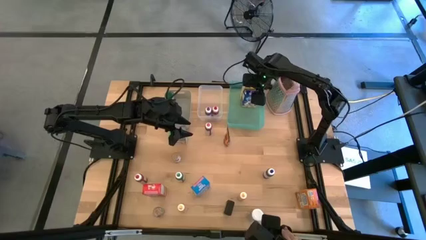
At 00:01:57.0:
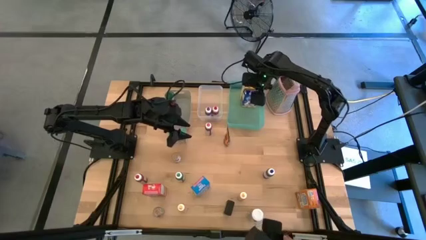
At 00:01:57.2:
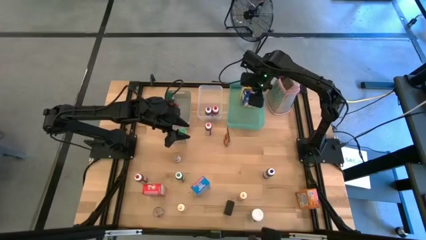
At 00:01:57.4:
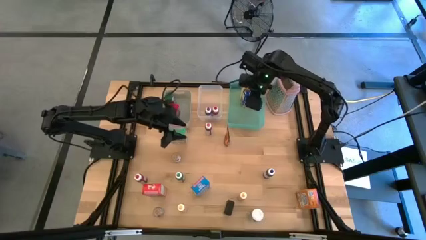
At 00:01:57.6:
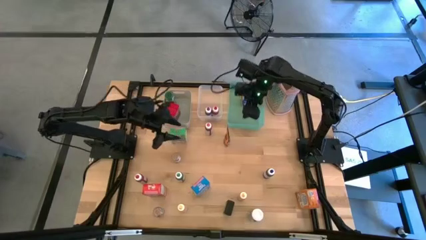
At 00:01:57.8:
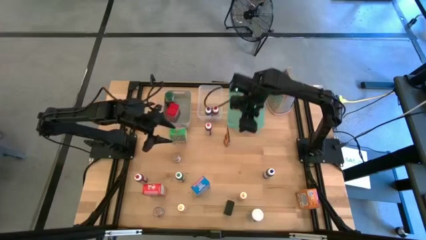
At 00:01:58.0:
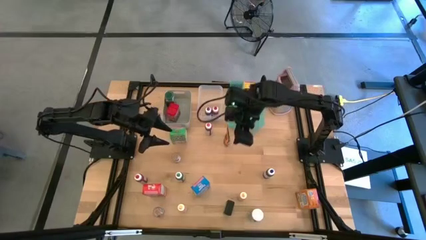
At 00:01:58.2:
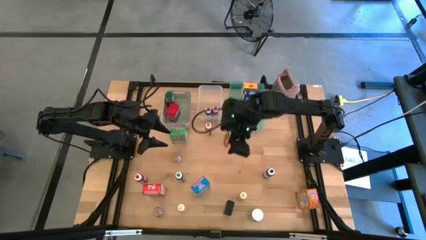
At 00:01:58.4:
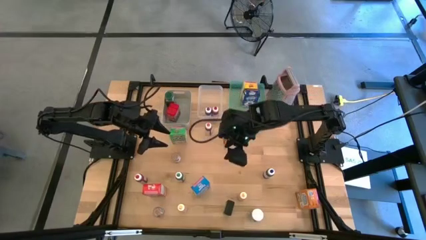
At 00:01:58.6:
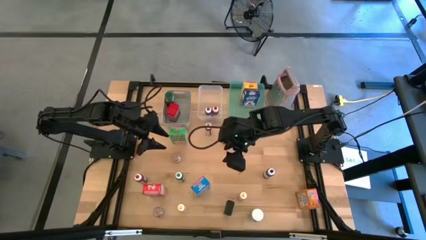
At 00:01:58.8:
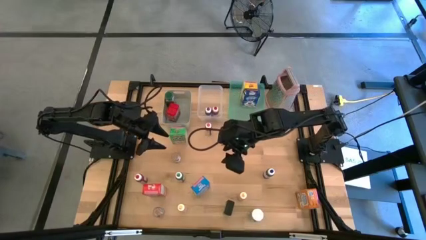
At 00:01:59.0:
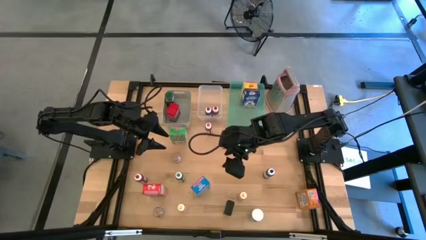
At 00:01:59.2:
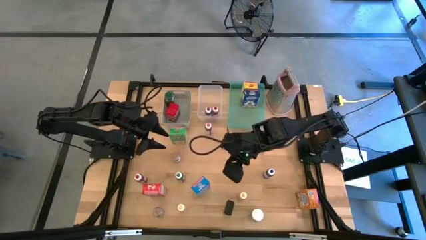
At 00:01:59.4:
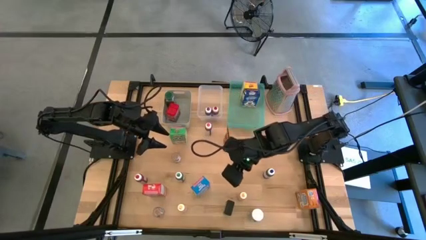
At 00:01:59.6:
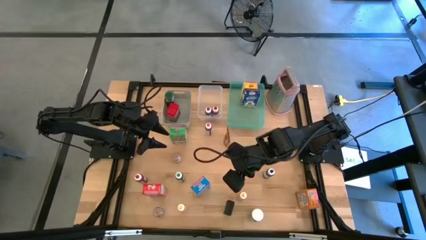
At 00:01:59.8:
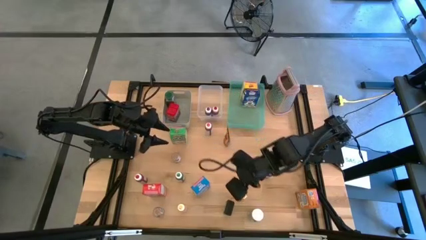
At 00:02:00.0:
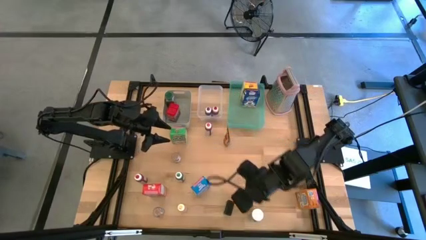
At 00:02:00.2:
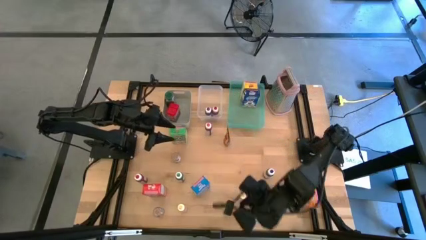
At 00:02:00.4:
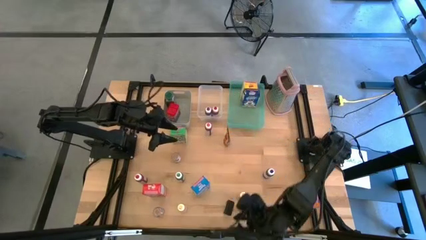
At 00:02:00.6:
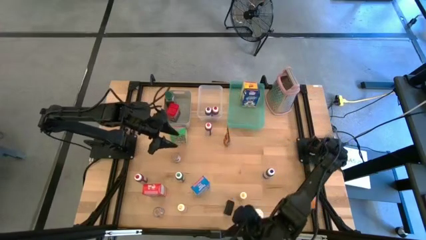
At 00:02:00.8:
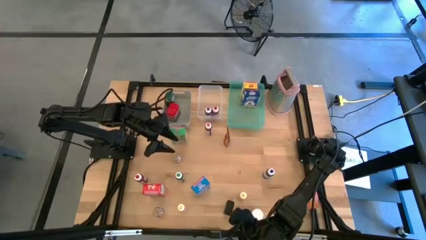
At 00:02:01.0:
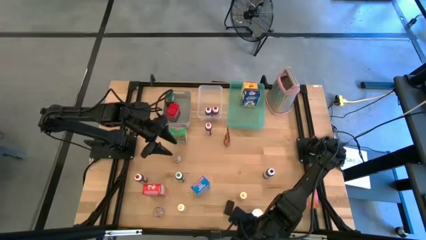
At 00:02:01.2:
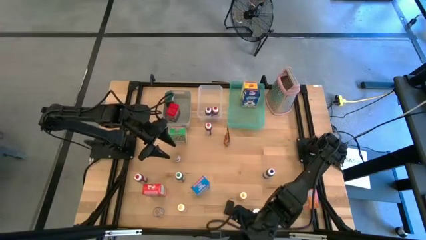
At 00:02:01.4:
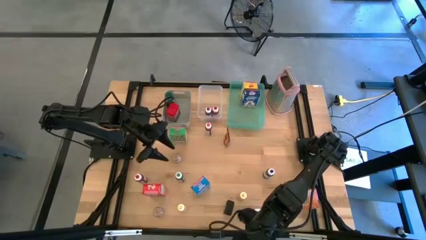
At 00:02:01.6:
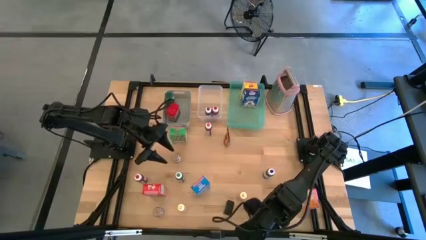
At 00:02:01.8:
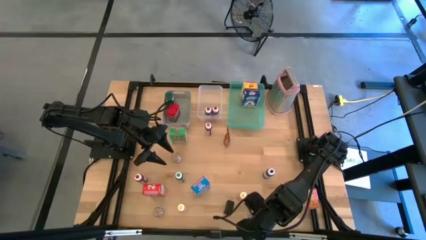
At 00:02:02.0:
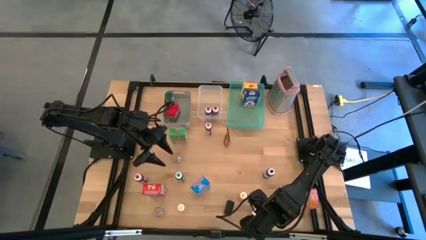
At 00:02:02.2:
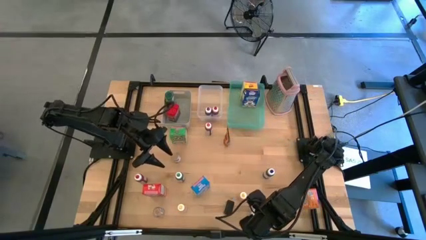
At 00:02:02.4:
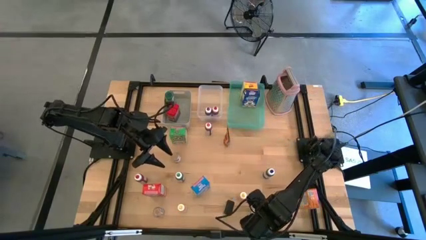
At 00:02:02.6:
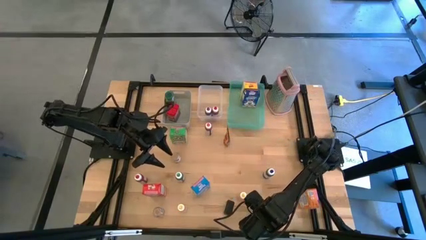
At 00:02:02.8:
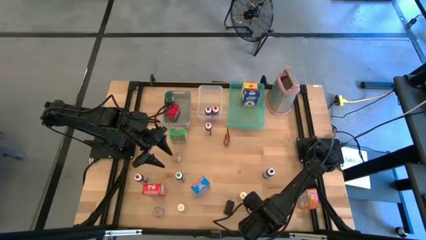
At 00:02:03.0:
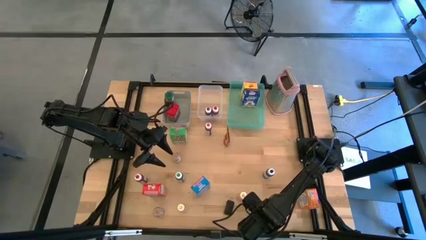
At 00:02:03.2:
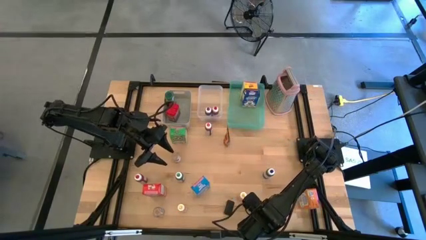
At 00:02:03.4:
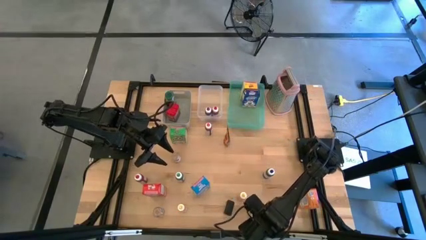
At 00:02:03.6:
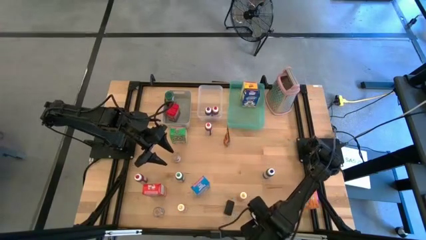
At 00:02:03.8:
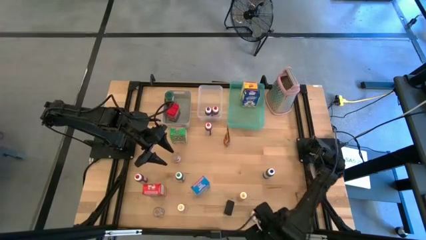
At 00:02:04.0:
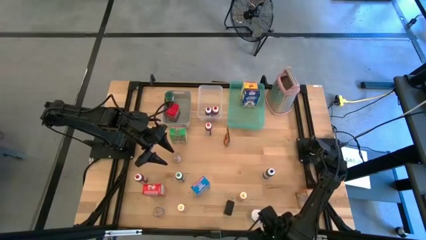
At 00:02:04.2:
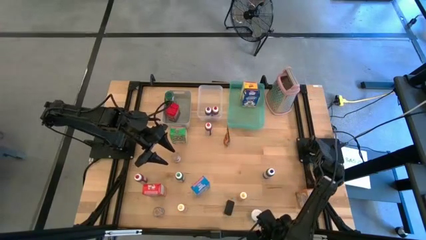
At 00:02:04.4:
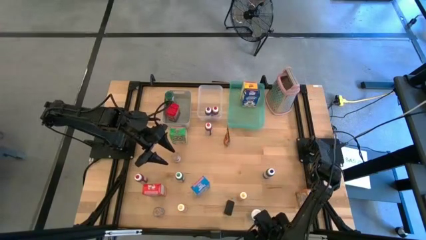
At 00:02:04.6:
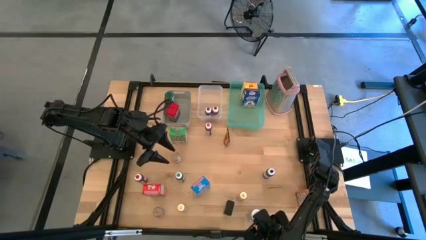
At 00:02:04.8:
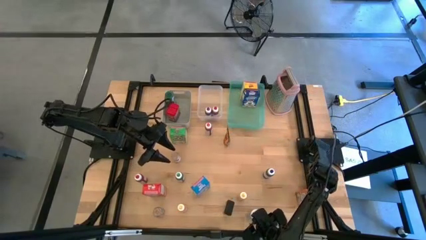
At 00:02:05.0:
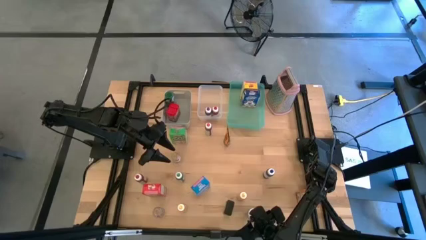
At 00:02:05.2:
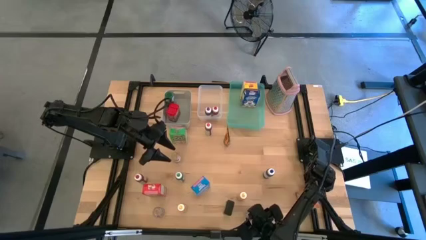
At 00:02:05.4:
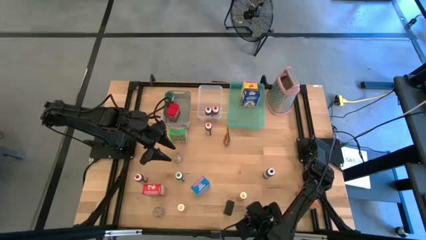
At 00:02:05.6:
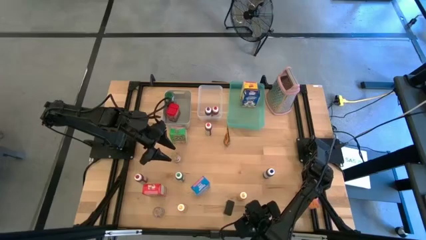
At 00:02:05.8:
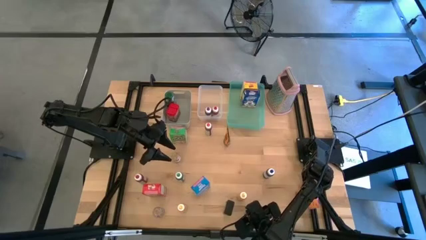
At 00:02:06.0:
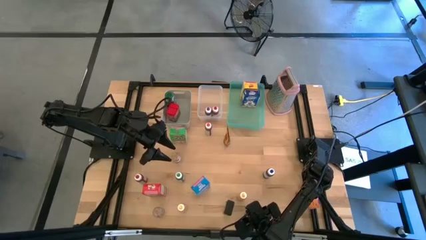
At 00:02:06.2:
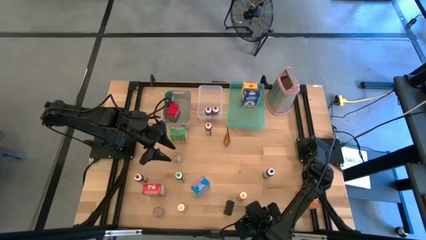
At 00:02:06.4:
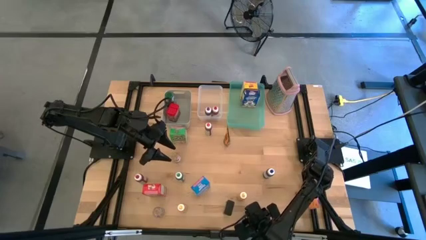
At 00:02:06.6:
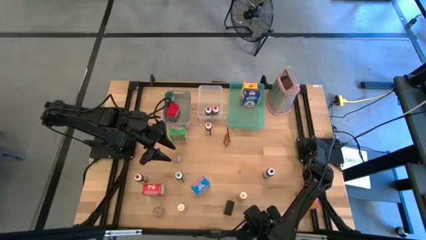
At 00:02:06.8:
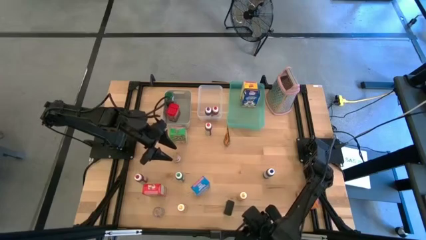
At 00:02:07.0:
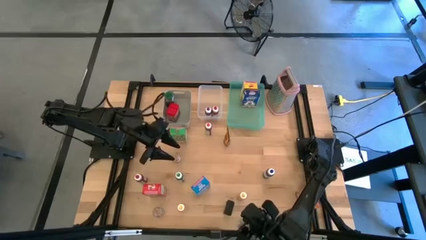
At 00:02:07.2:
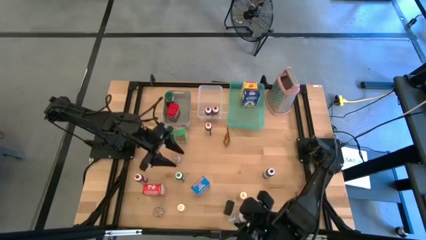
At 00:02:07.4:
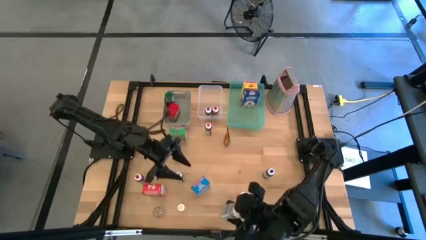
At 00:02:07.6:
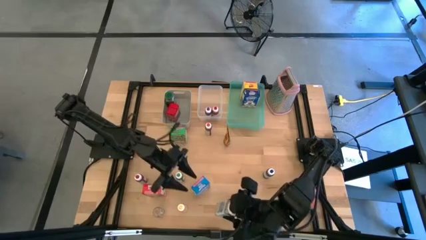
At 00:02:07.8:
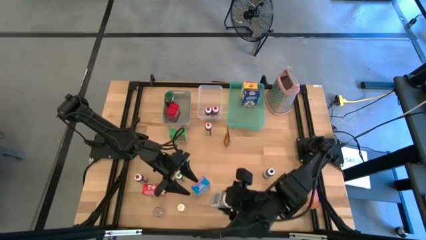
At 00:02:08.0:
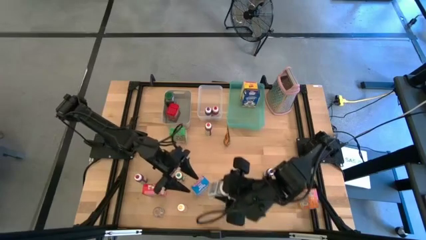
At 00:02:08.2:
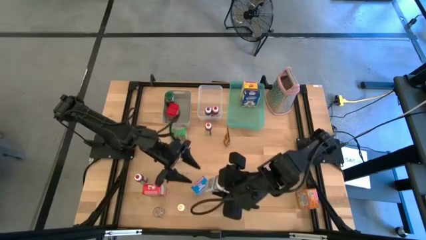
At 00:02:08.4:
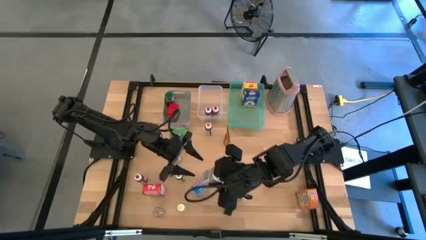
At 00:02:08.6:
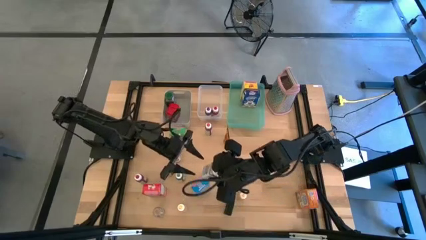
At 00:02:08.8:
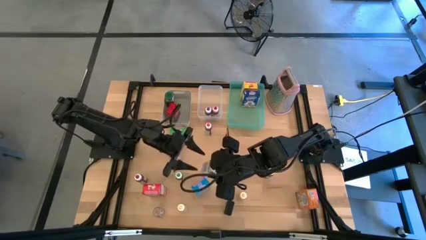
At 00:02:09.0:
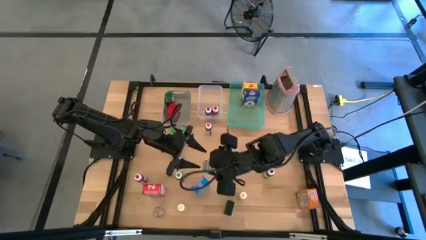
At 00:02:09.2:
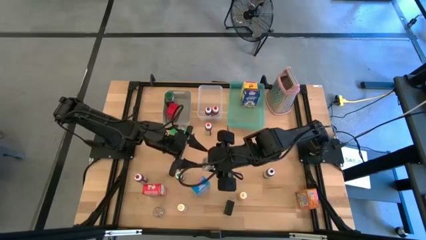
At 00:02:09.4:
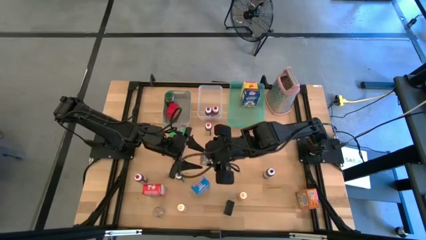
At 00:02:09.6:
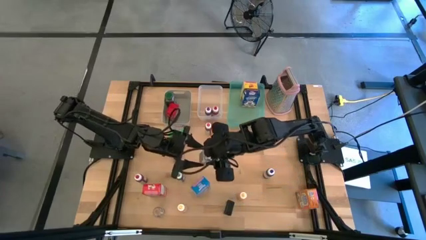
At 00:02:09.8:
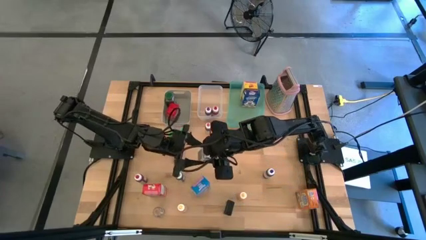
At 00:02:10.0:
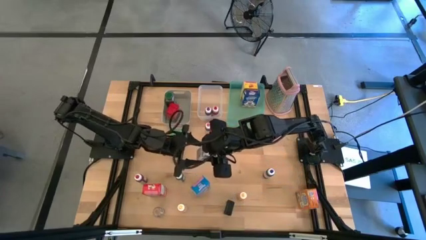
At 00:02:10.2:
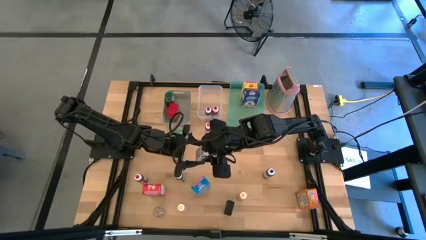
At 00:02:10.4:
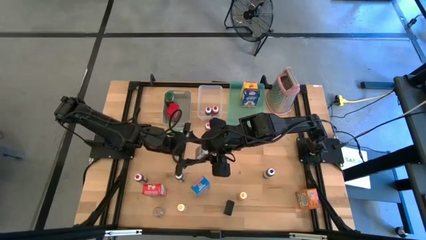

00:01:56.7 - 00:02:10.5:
Task: Pick & Place Kitchen Items
Put the white seasoning bottle into the gray bin
